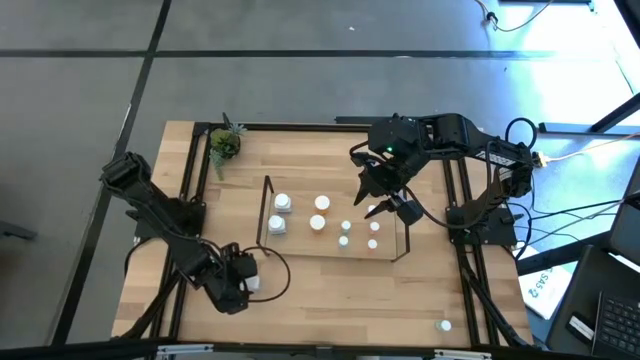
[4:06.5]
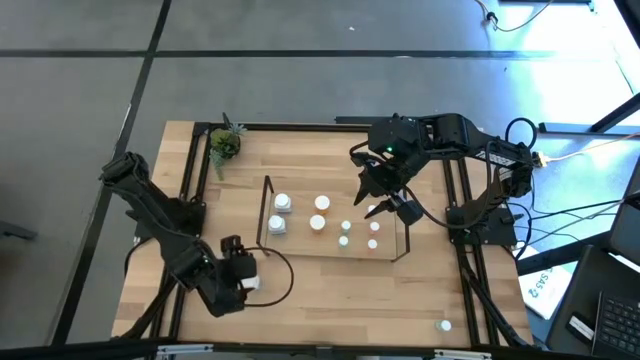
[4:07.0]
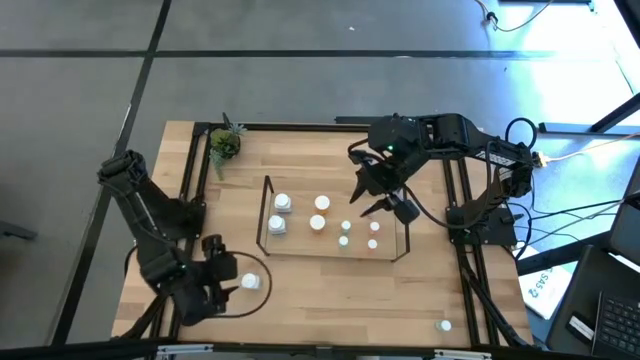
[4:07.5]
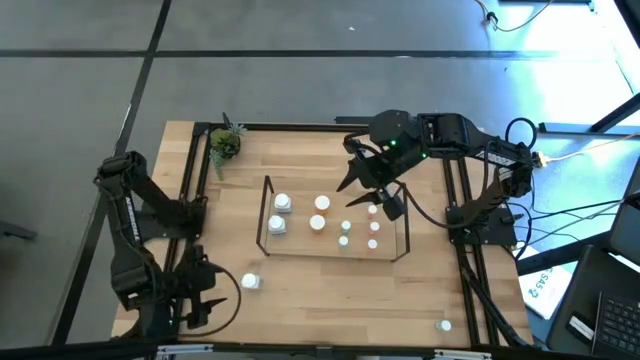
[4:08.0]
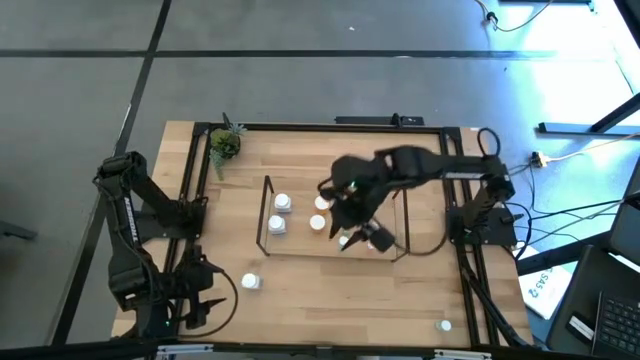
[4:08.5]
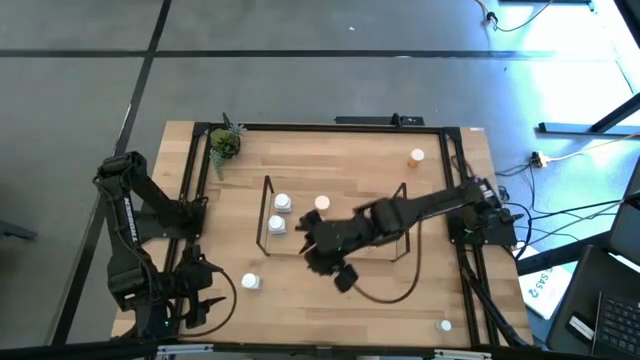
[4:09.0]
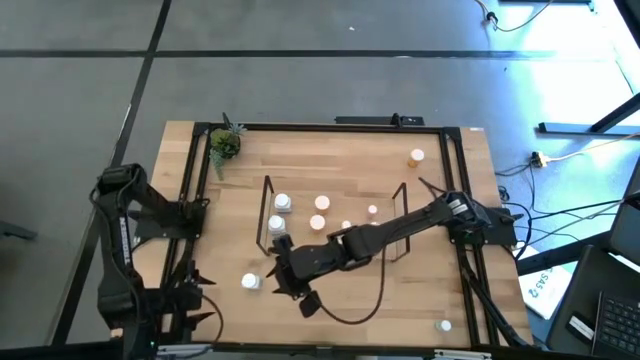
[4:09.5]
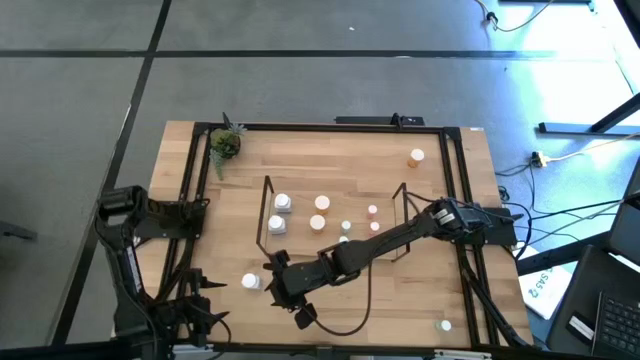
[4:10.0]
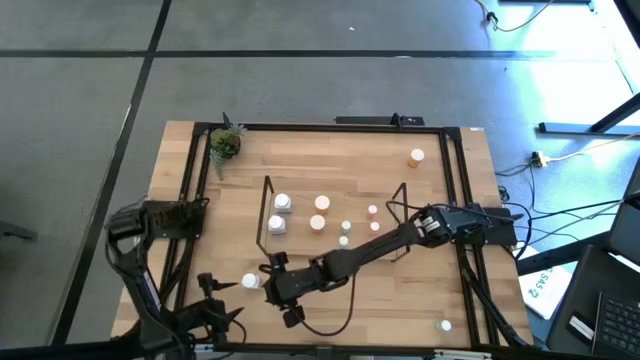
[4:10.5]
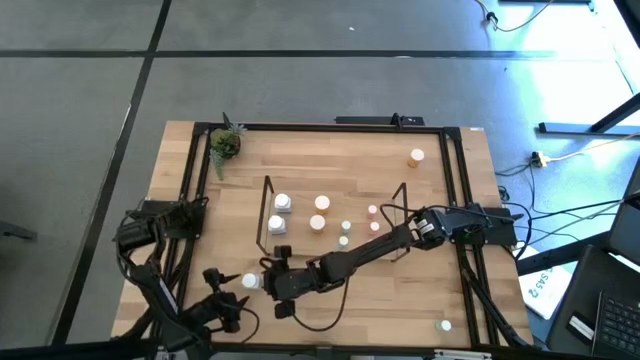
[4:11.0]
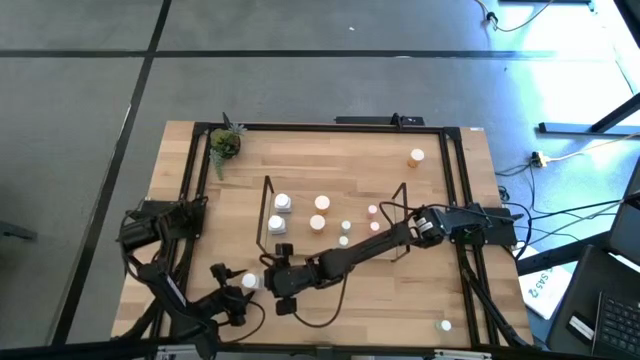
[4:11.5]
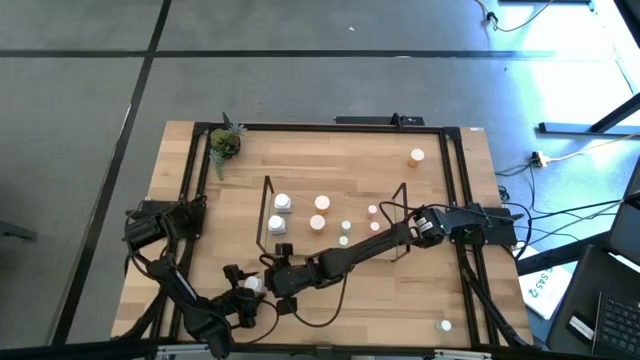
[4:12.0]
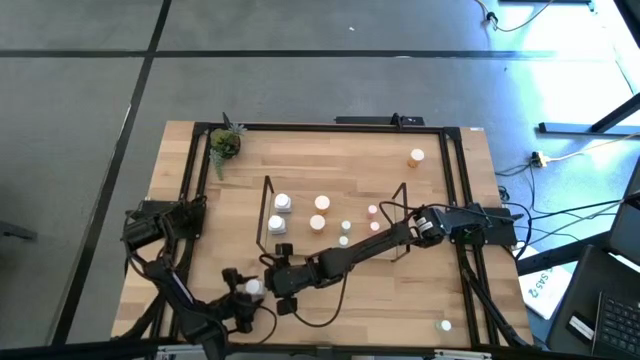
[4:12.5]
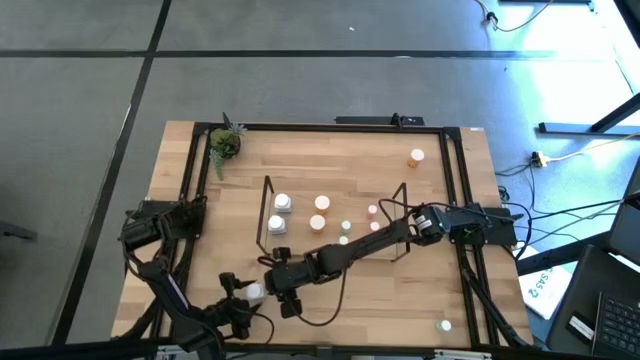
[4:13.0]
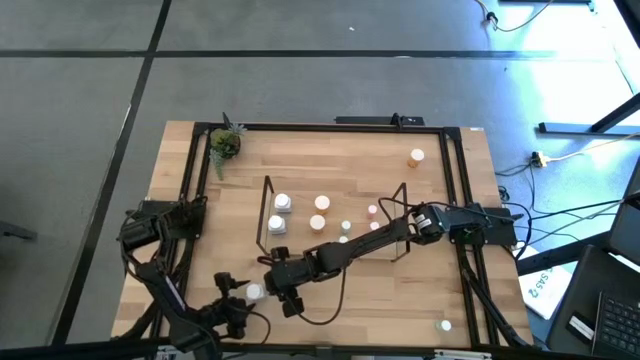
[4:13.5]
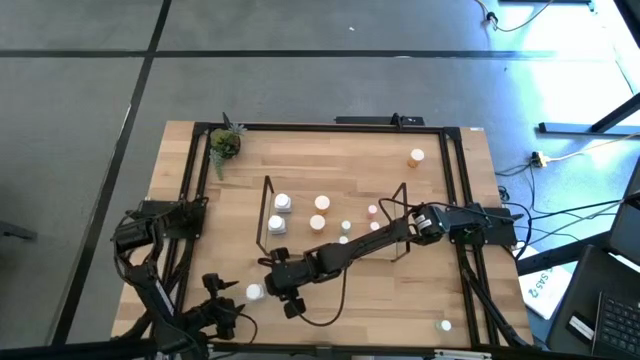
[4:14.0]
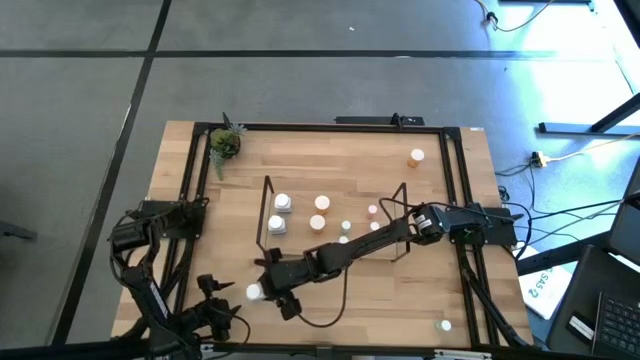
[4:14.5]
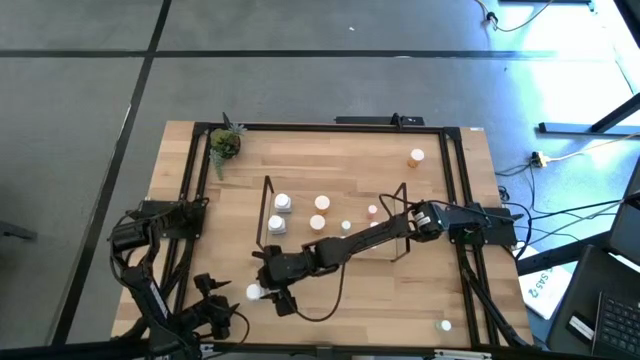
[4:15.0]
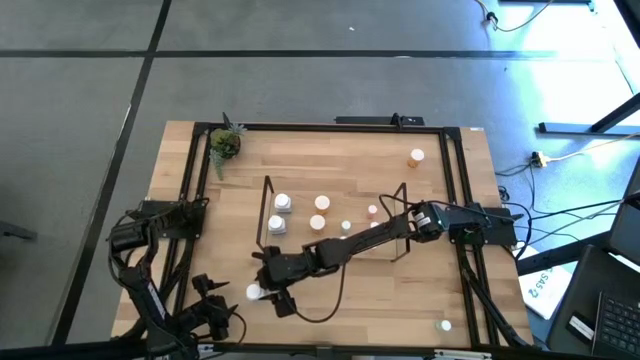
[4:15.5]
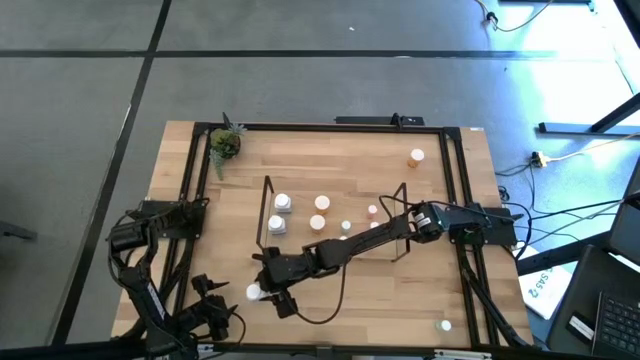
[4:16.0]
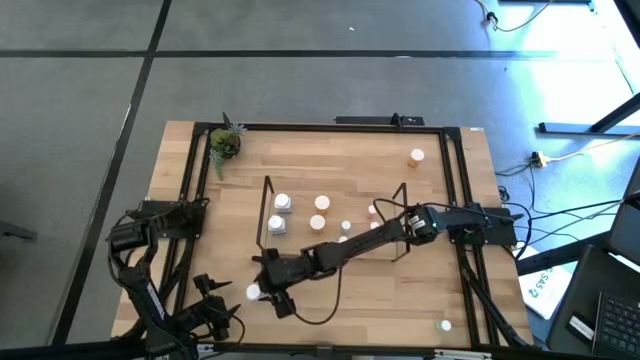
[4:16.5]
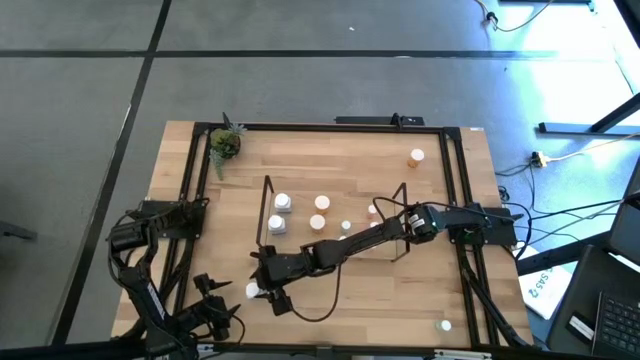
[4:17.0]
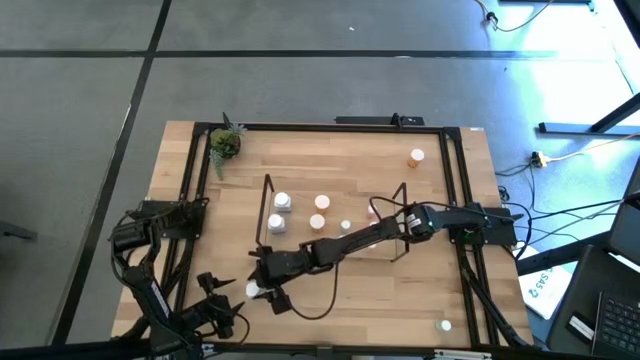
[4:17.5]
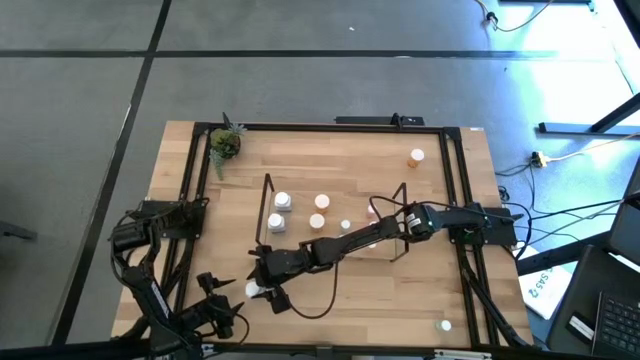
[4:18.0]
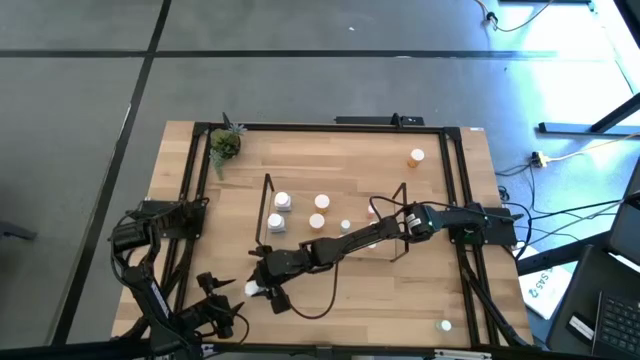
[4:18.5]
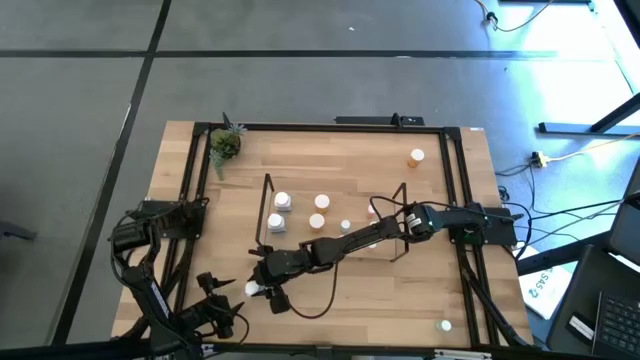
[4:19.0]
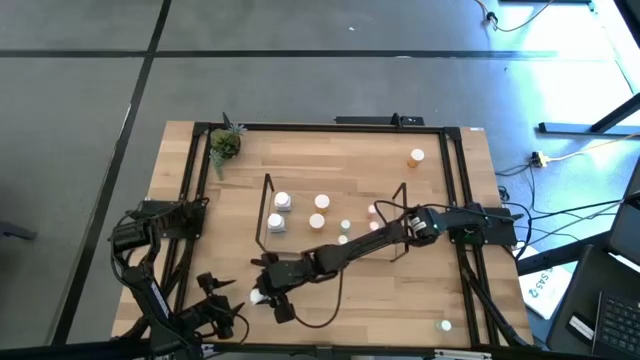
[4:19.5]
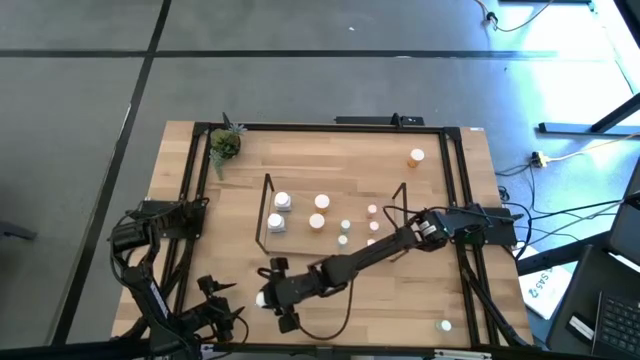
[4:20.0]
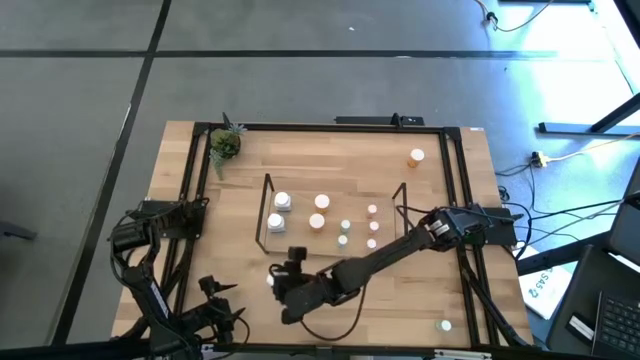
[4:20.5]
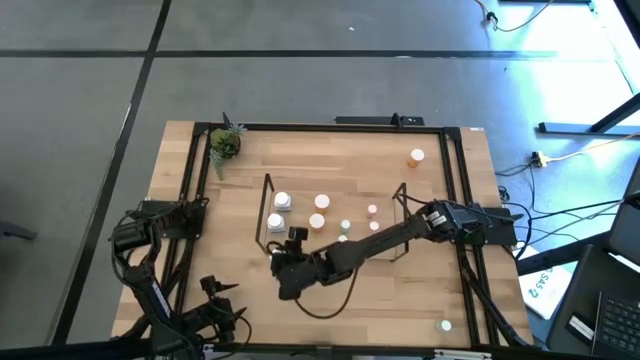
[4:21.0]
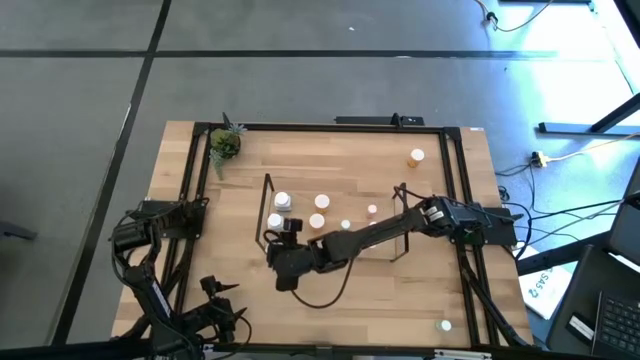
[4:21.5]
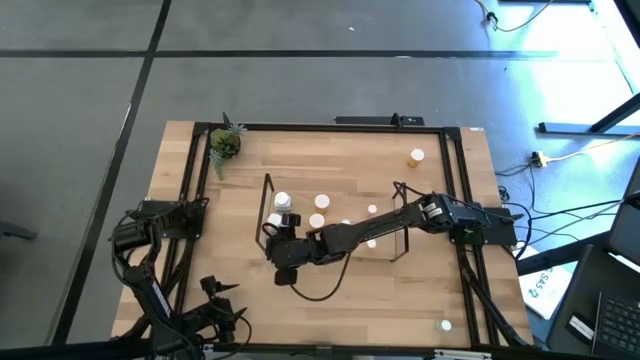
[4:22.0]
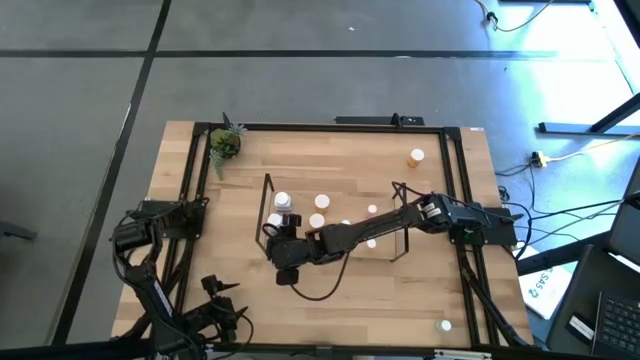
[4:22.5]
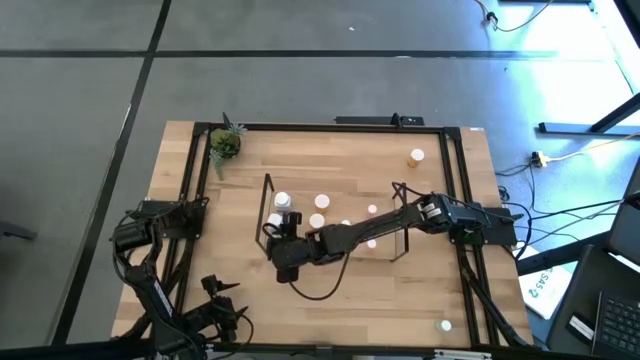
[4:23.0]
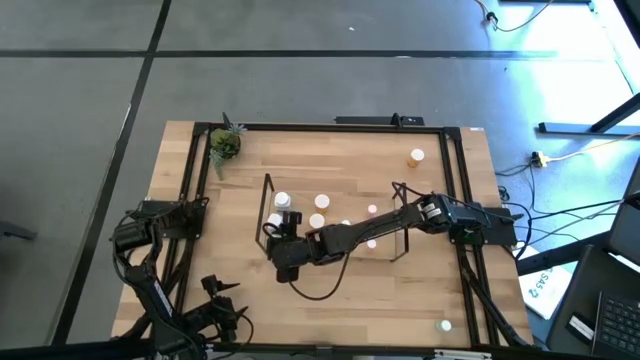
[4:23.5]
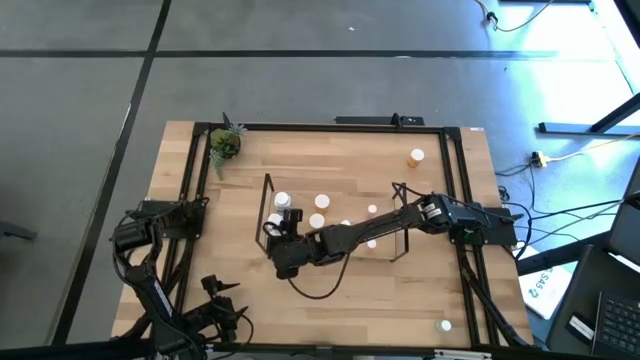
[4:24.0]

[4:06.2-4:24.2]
Task: Pick and place medicine bottles onto shelf by color
Put the white pill bottle on the shelf aligned with the other white pill bottle

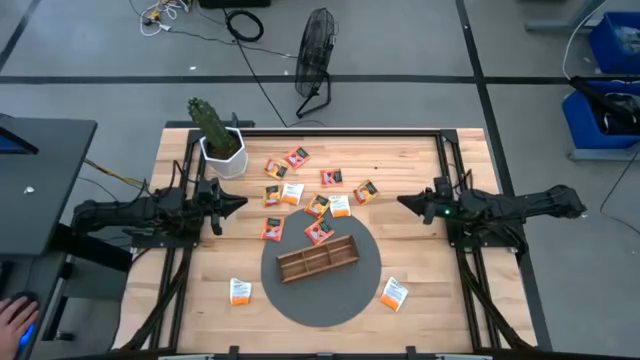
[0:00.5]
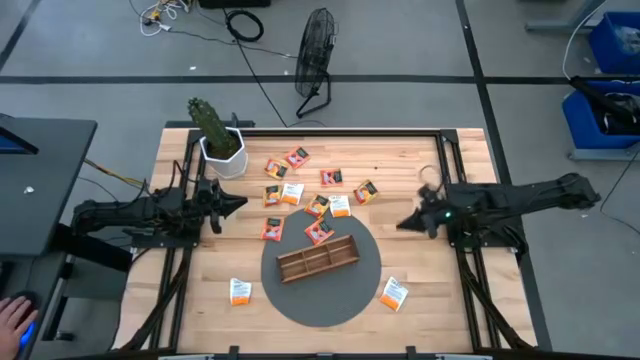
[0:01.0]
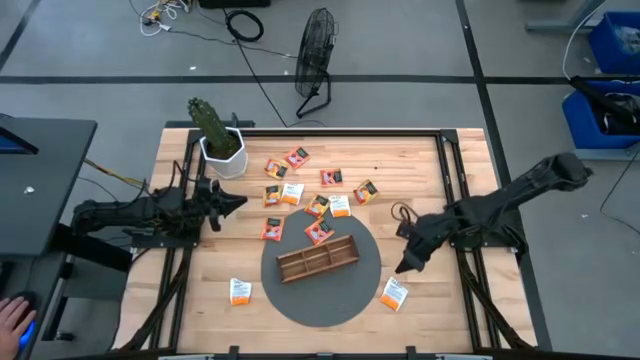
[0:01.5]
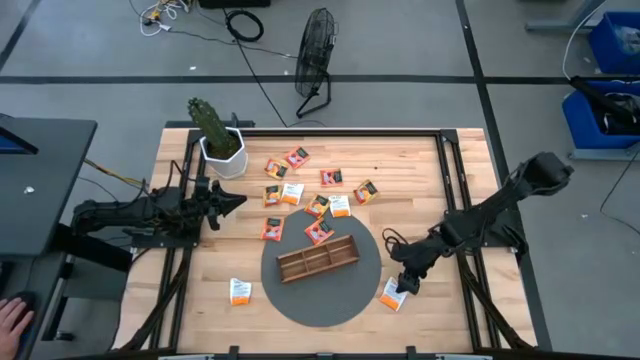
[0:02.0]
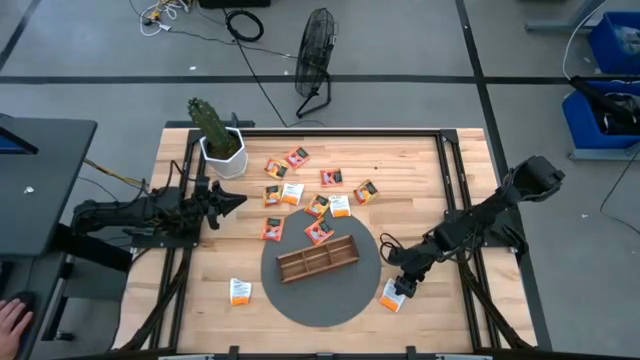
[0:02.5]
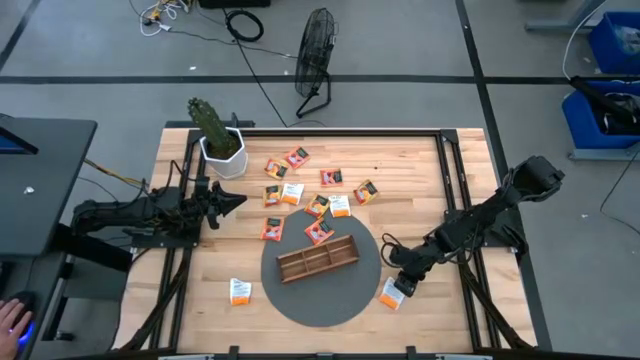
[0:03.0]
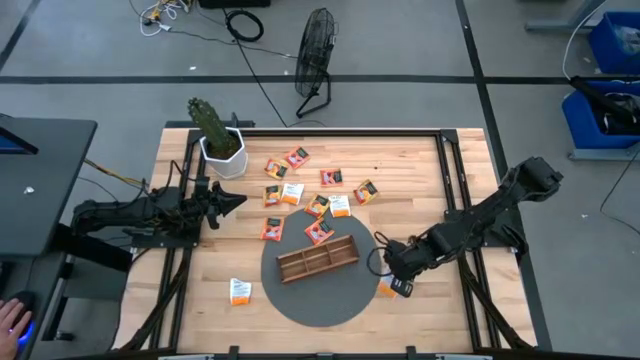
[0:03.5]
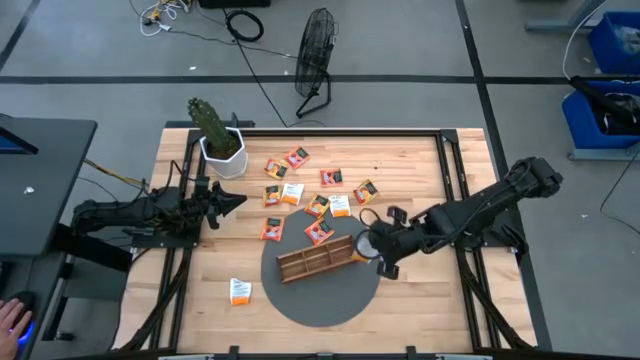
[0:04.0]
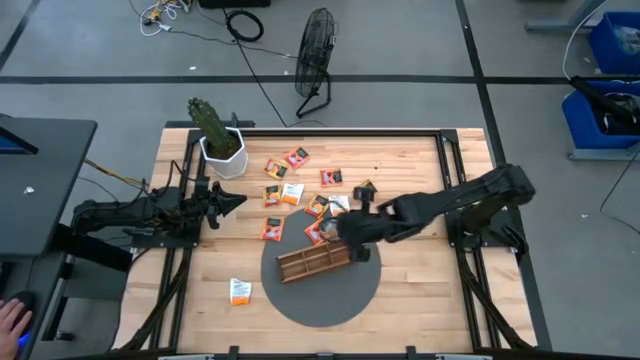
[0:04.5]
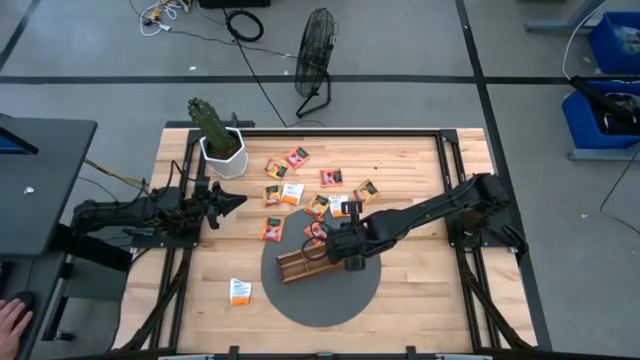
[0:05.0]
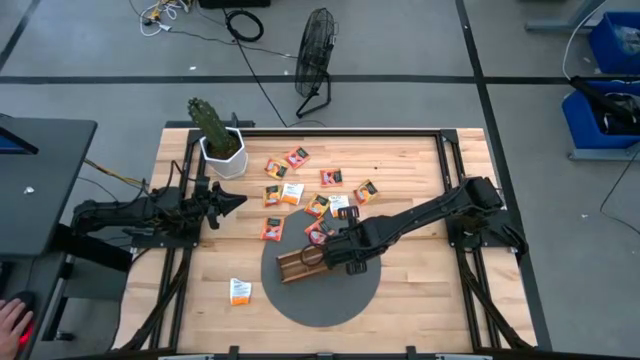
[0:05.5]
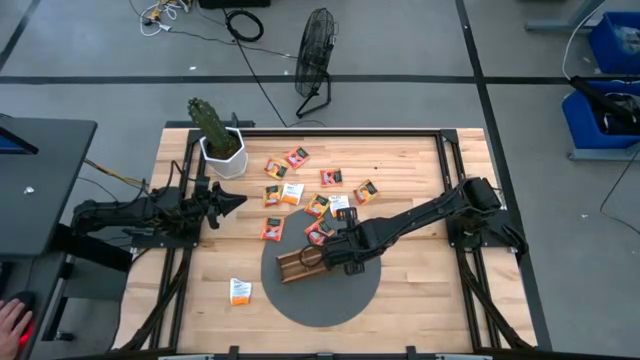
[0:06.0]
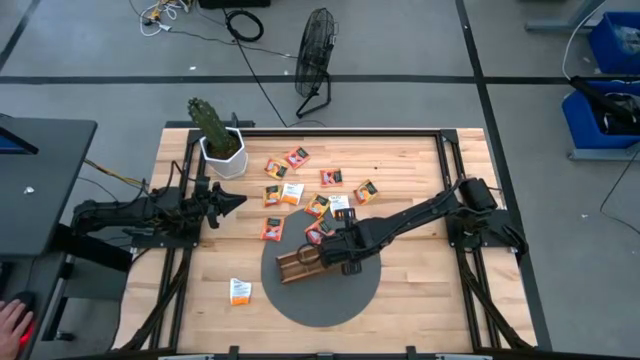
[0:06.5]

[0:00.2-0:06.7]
Task: Pick & Place Tea
Put the white tea bag into the right section of the wooden organizer
